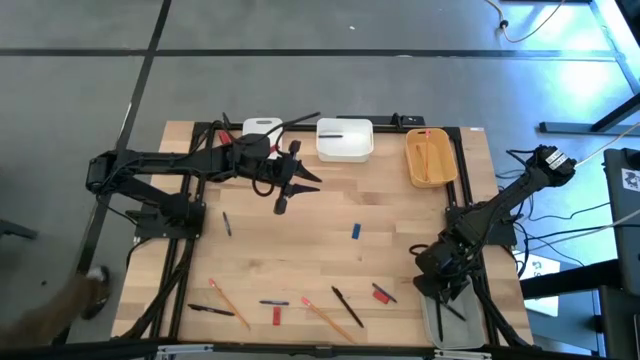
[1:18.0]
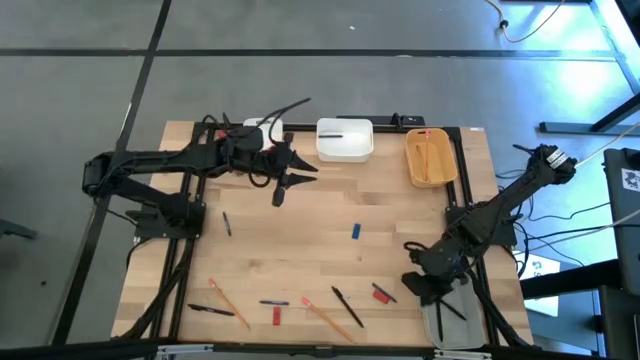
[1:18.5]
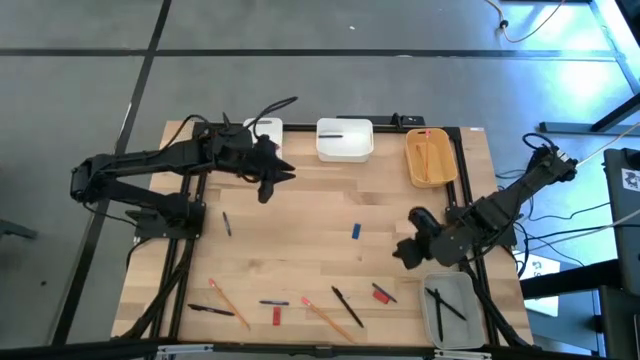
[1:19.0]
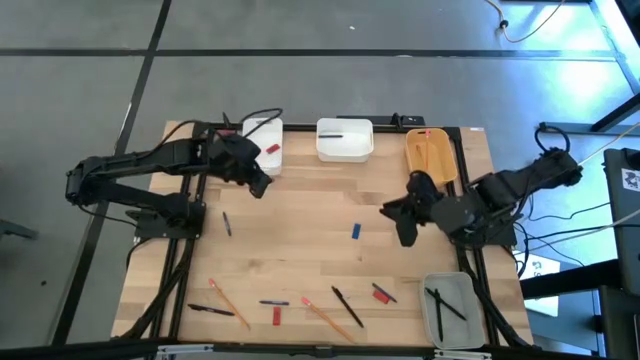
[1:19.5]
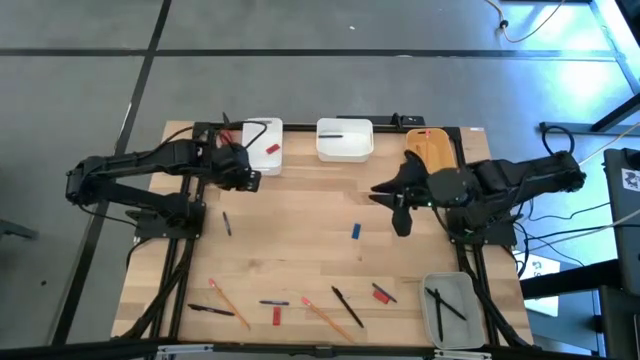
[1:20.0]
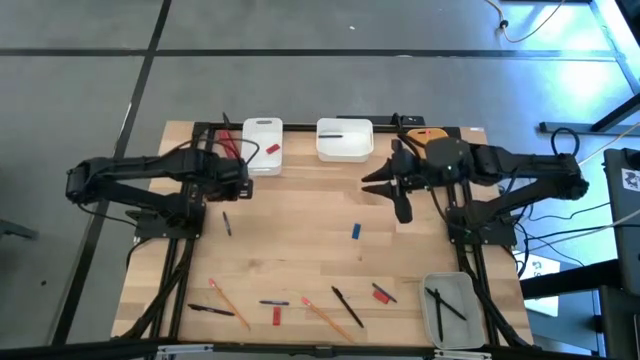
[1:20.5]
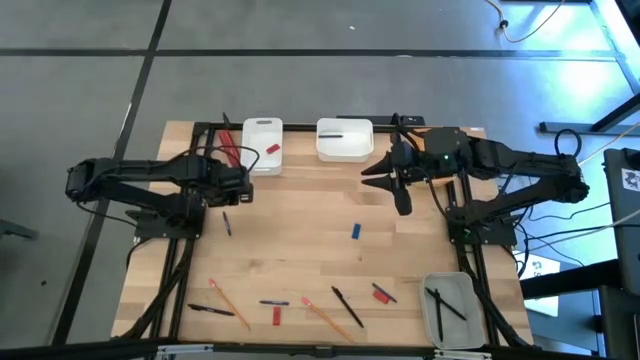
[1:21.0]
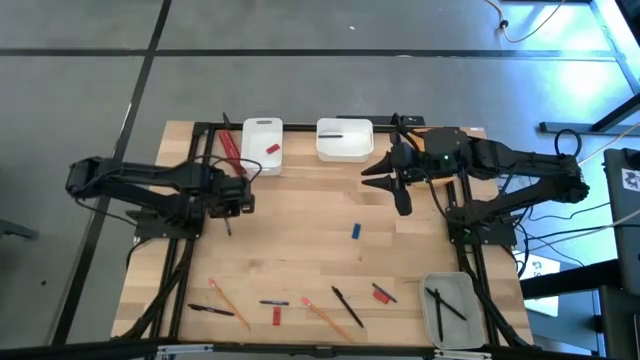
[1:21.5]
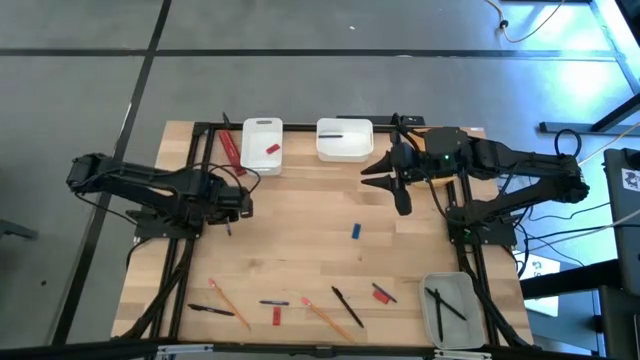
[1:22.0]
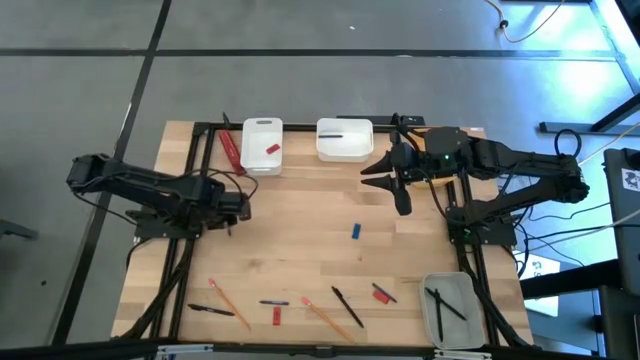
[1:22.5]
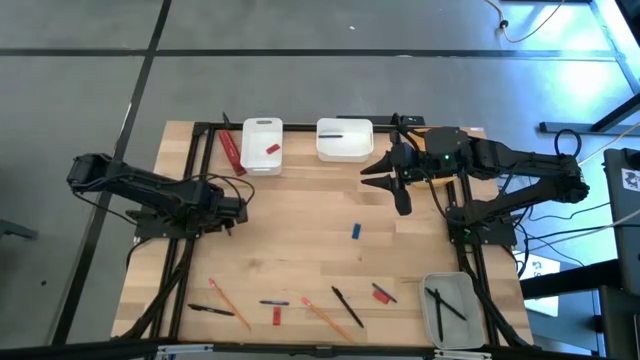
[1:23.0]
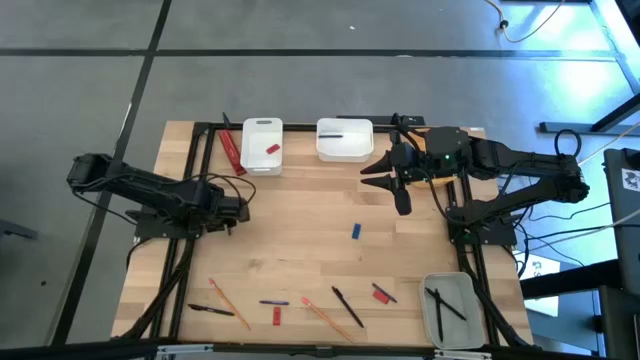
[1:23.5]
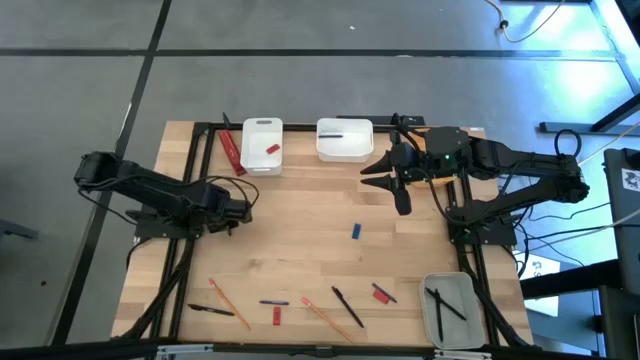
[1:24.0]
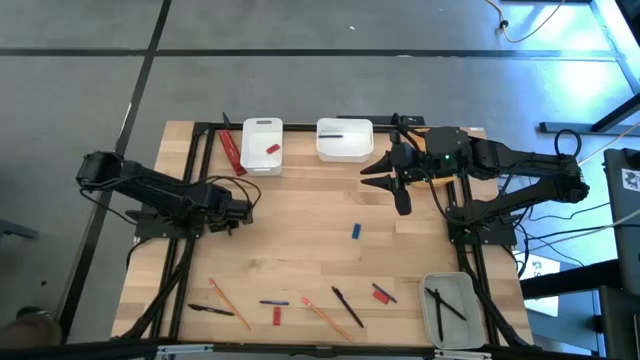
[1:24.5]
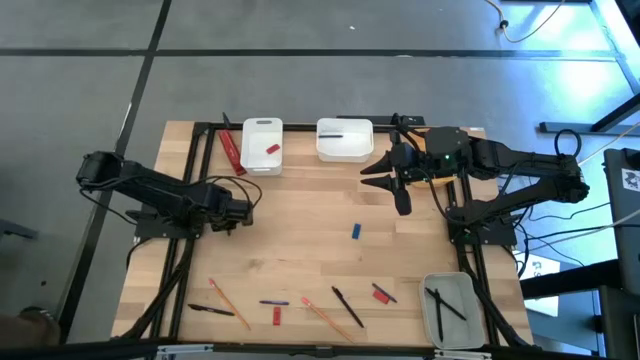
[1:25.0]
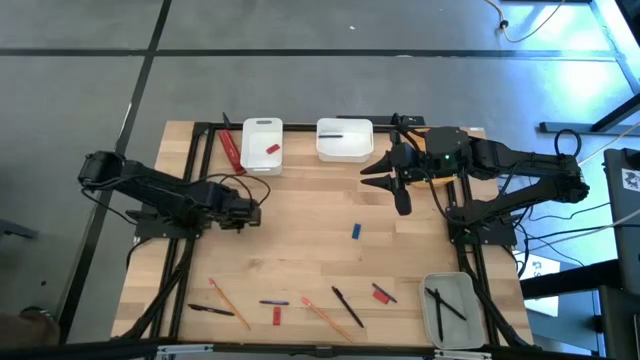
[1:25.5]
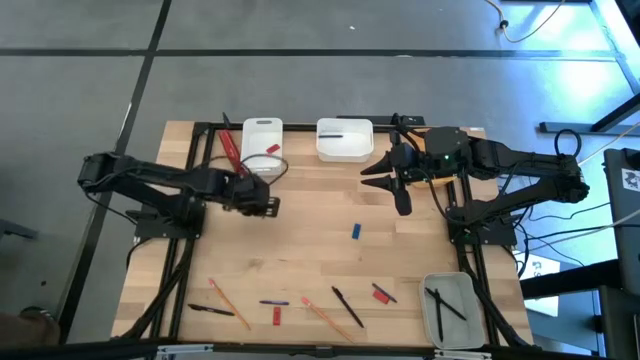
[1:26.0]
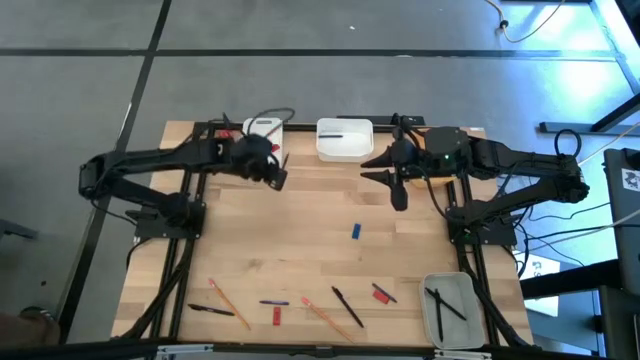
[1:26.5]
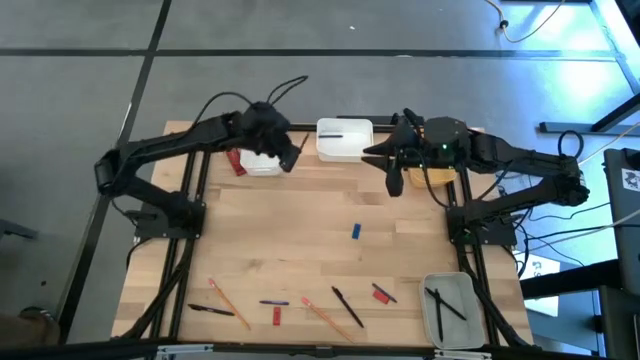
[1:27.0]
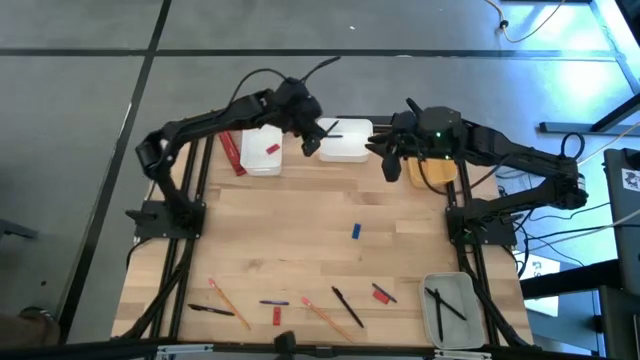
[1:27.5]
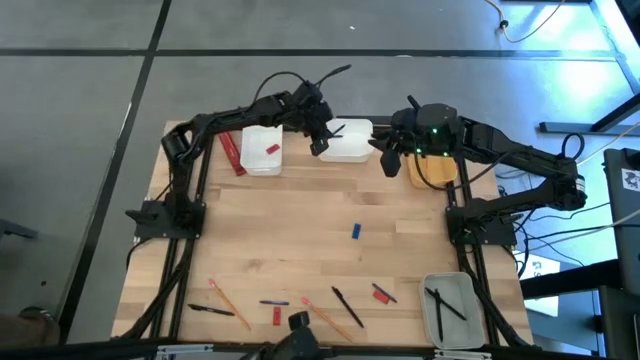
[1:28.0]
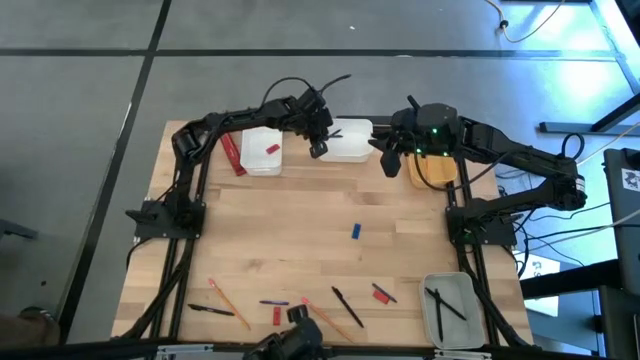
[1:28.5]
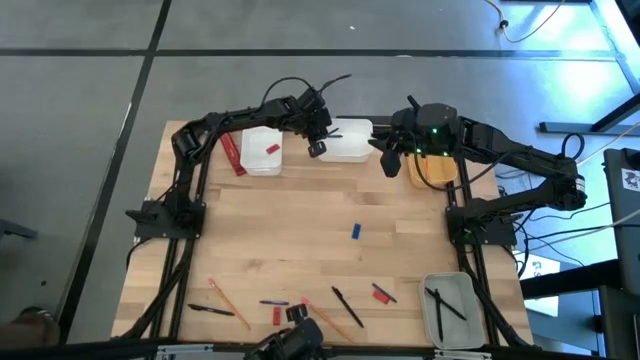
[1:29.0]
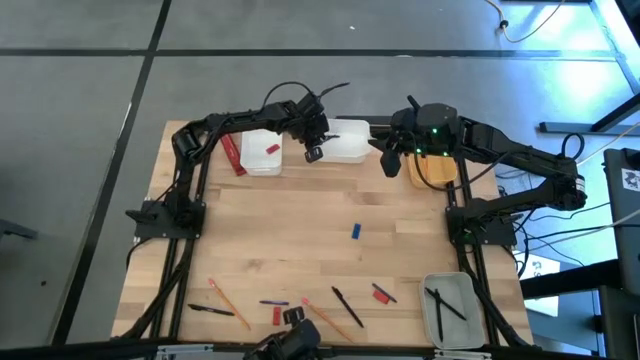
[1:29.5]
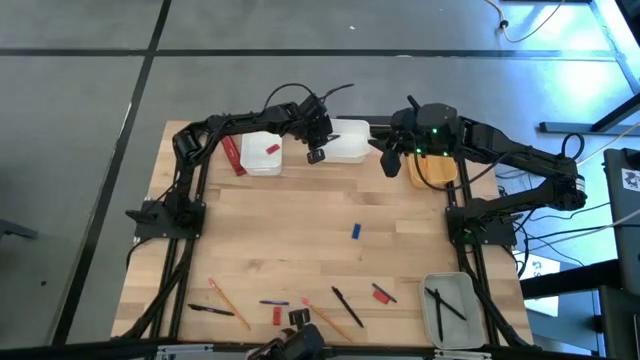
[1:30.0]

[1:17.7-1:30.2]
Task: Sort crayons/erasers/pens/pencils in bins
Put the blue crayon into the right white bin

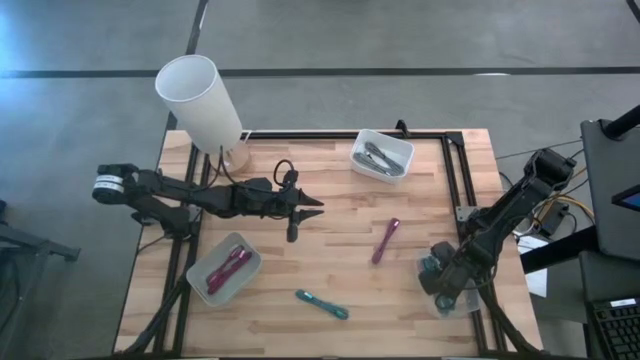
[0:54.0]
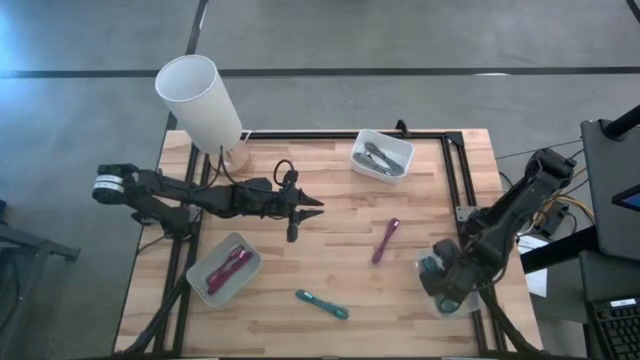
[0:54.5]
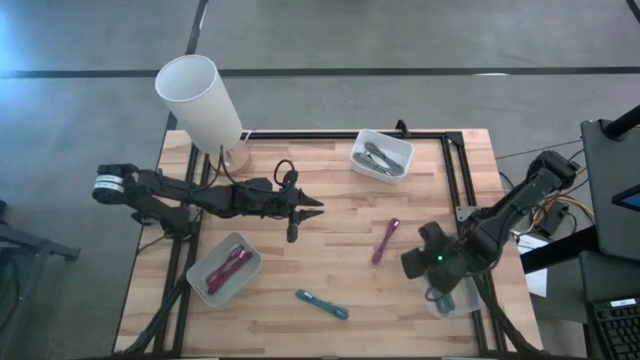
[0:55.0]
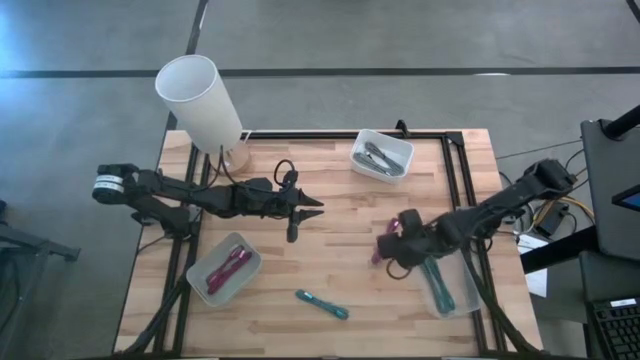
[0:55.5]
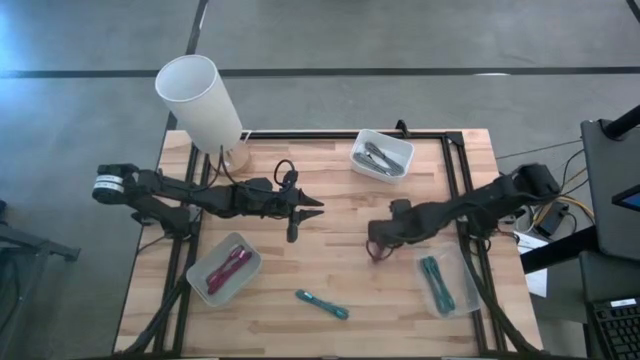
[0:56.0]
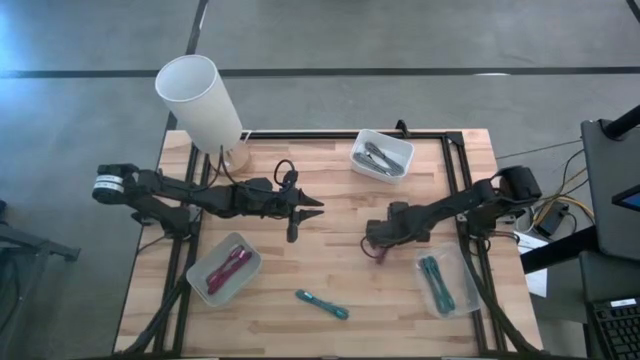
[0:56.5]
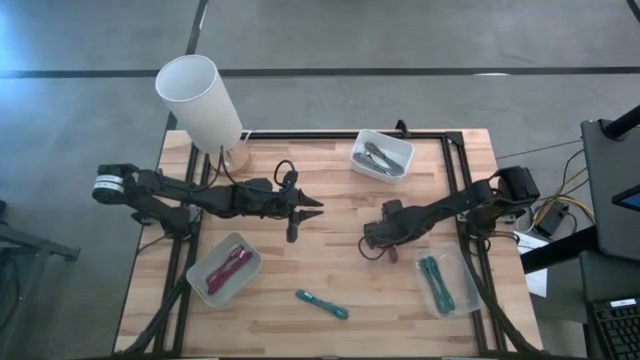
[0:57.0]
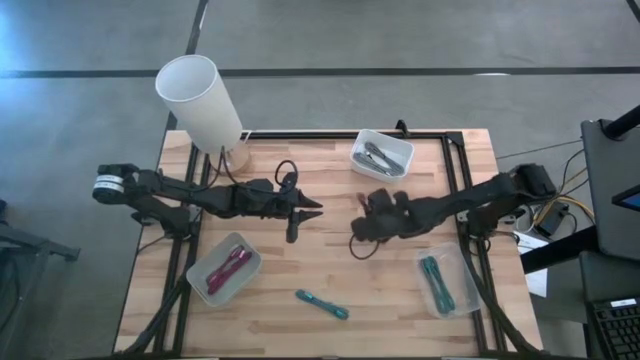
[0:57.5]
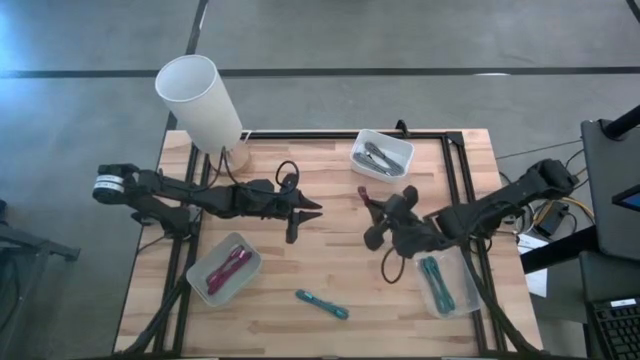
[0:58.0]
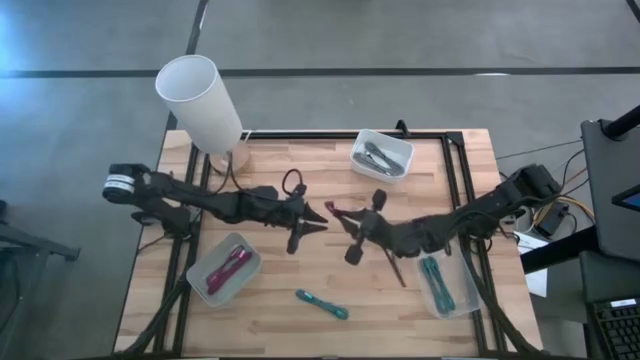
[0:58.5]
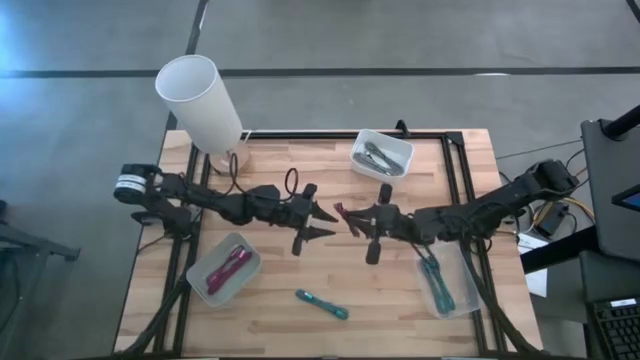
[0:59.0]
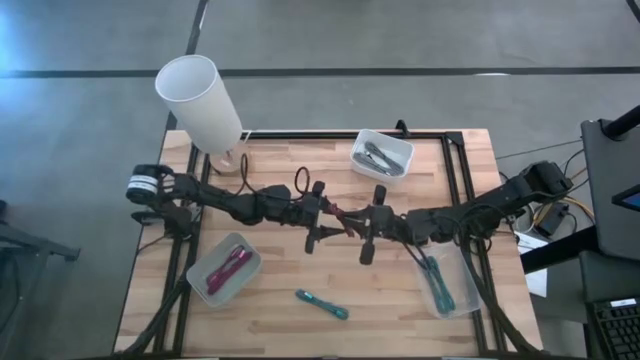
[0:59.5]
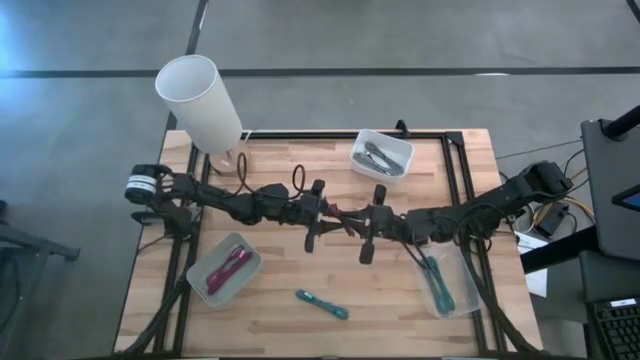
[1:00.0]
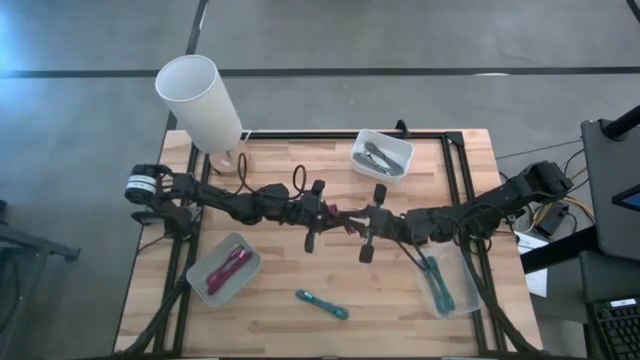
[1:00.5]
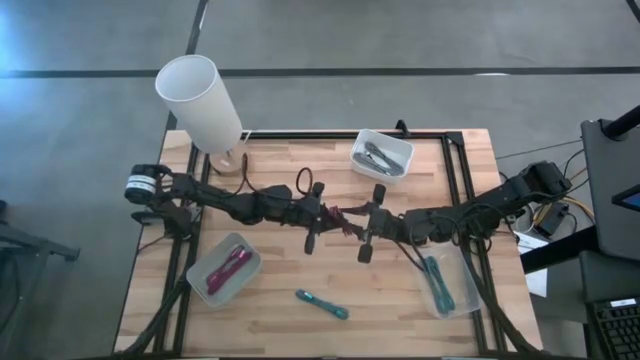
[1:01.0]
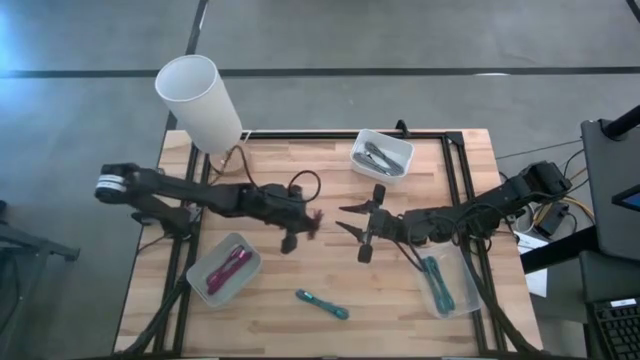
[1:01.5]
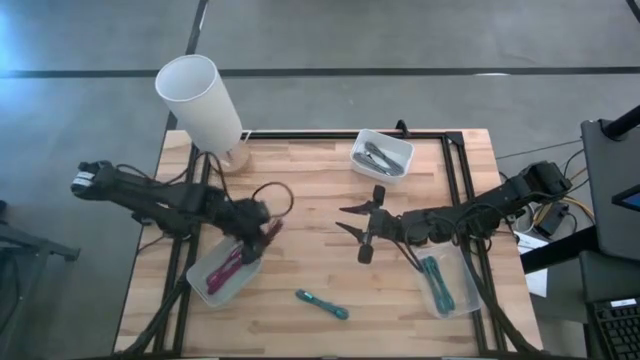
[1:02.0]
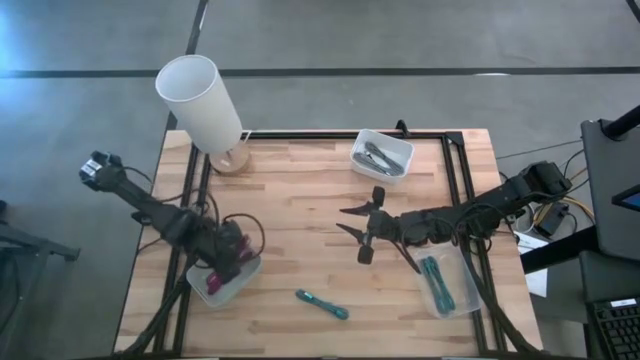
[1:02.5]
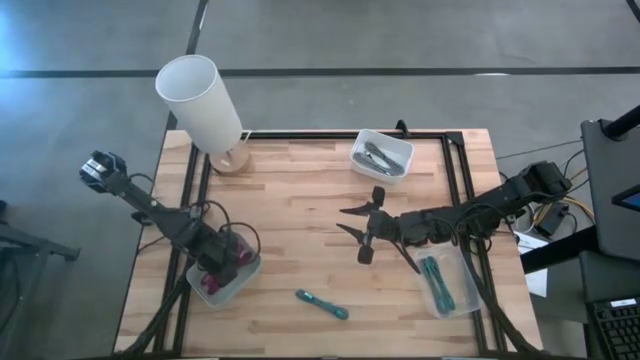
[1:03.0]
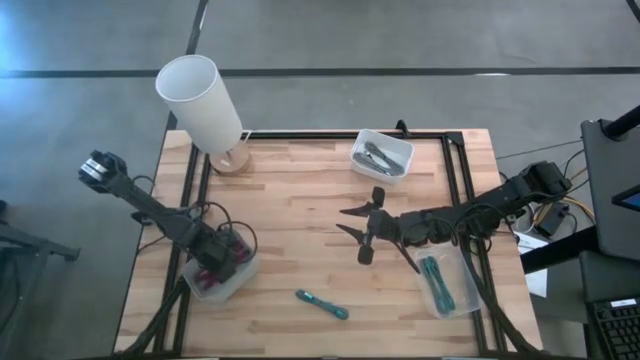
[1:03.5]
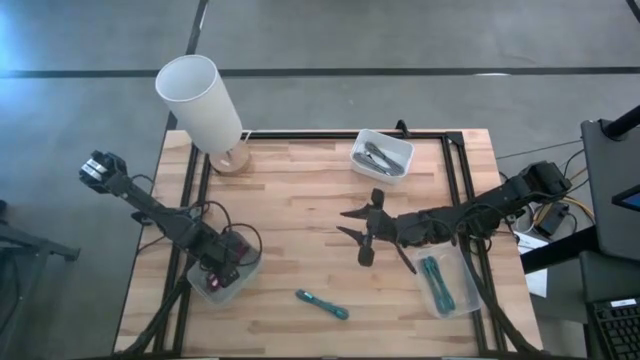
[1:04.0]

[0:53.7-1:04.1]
Task: Pick & Place USB Port
Put the red patterned charger cable into the gray bin
